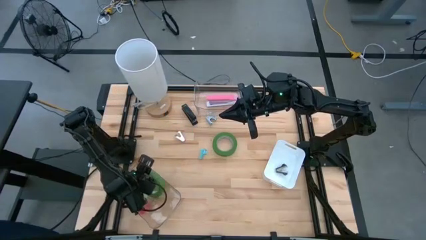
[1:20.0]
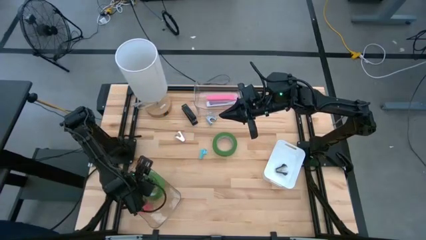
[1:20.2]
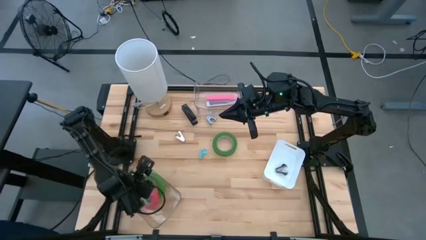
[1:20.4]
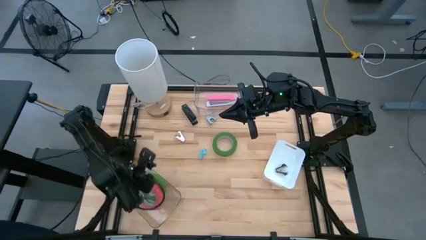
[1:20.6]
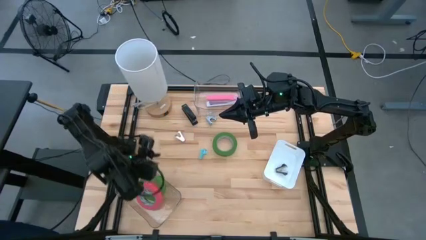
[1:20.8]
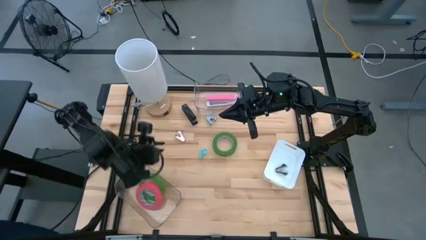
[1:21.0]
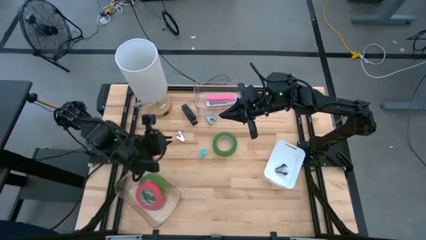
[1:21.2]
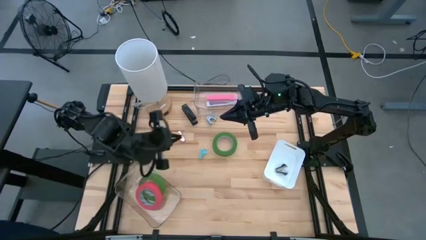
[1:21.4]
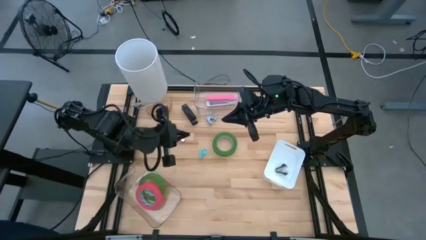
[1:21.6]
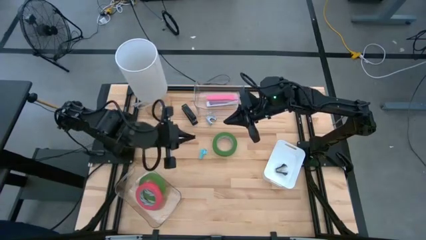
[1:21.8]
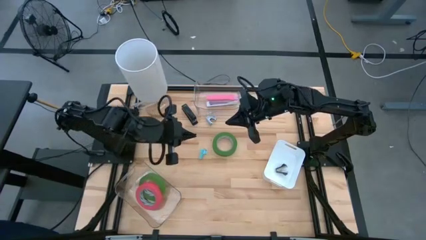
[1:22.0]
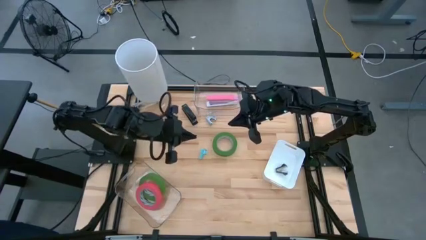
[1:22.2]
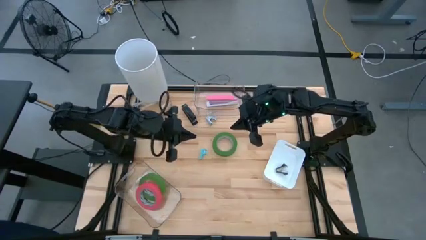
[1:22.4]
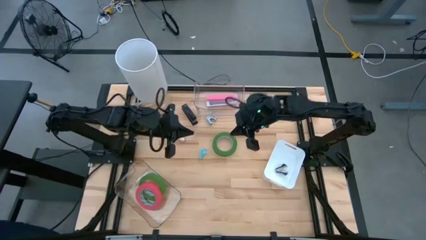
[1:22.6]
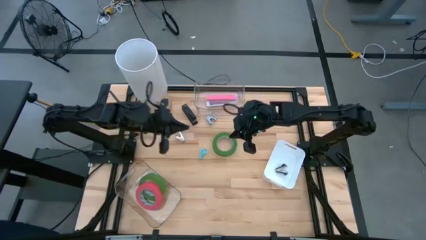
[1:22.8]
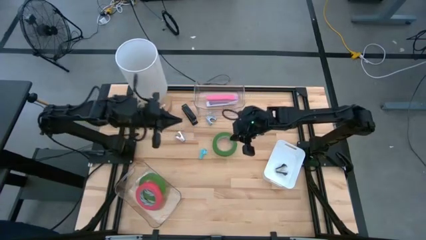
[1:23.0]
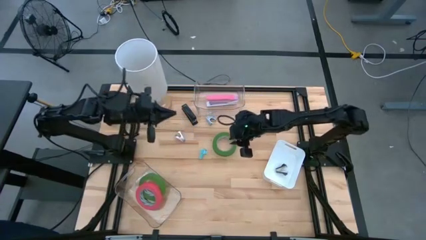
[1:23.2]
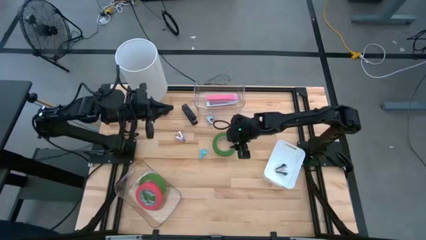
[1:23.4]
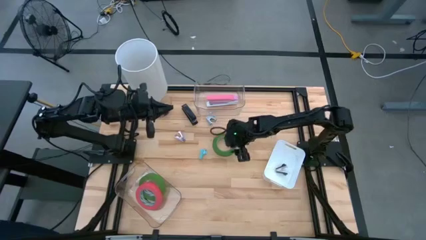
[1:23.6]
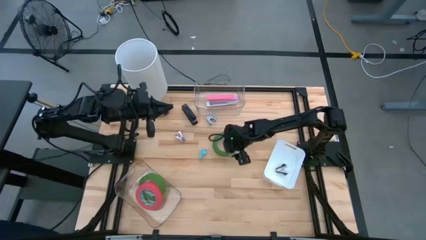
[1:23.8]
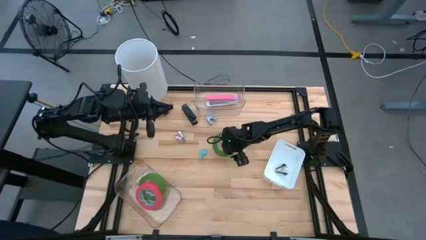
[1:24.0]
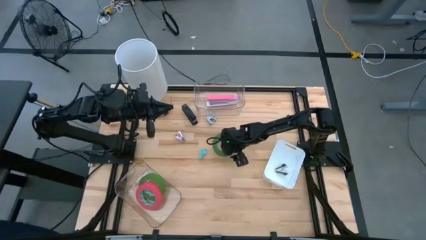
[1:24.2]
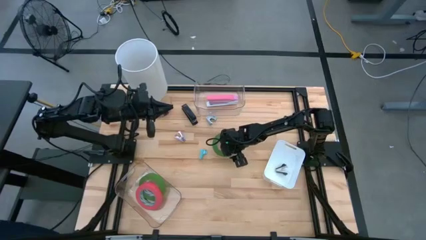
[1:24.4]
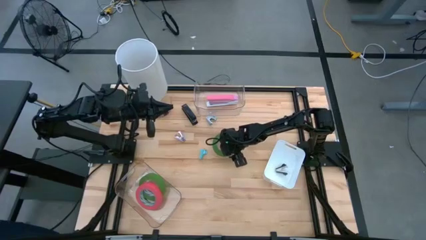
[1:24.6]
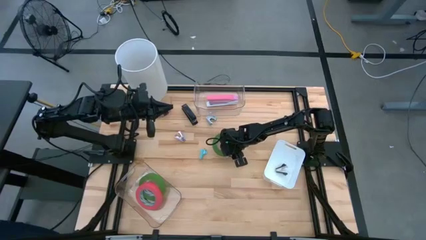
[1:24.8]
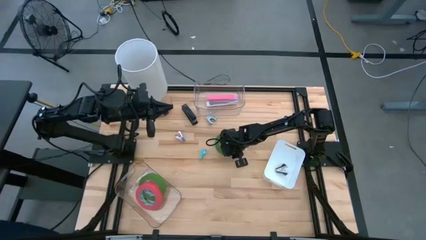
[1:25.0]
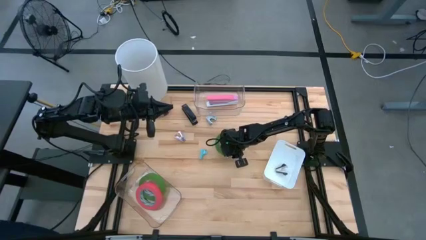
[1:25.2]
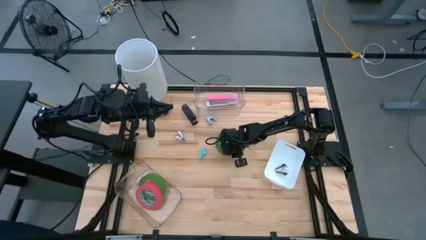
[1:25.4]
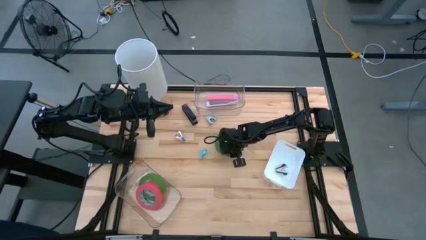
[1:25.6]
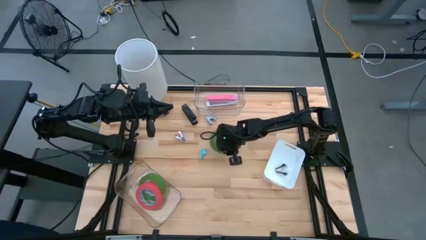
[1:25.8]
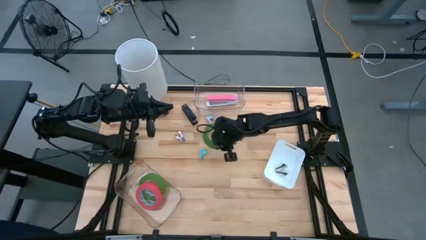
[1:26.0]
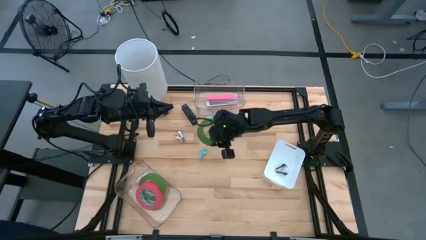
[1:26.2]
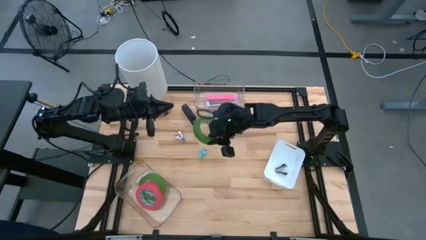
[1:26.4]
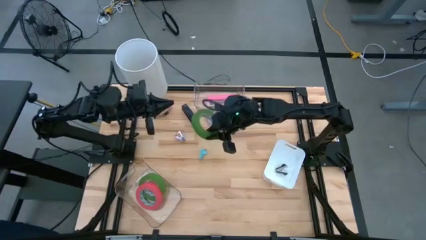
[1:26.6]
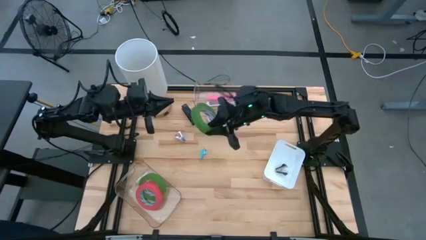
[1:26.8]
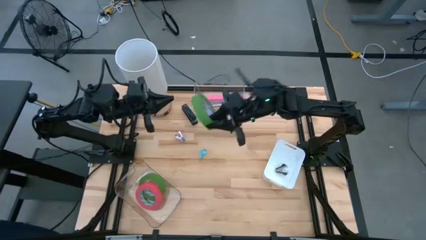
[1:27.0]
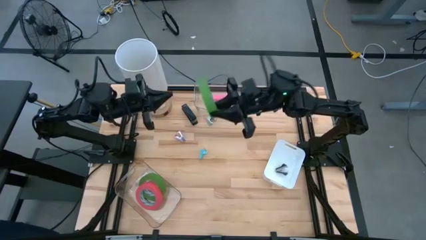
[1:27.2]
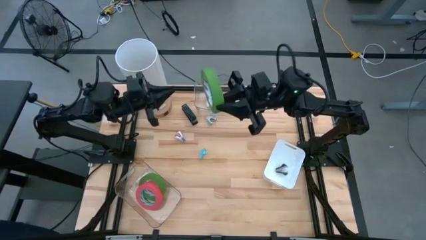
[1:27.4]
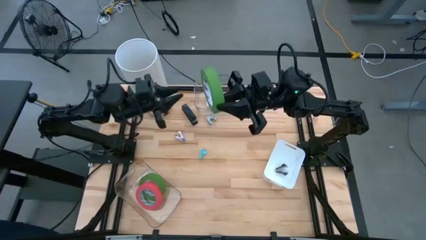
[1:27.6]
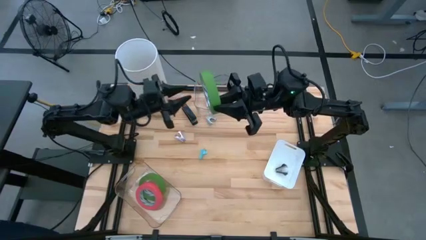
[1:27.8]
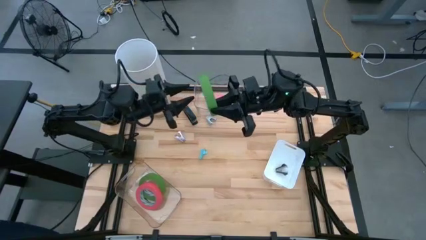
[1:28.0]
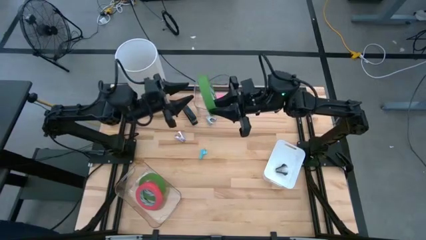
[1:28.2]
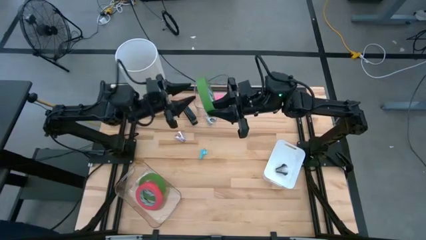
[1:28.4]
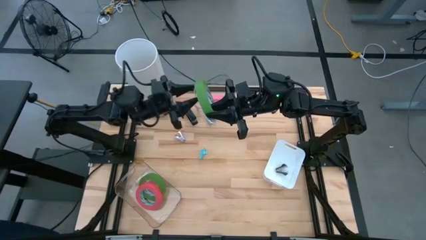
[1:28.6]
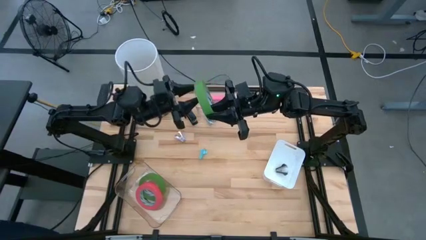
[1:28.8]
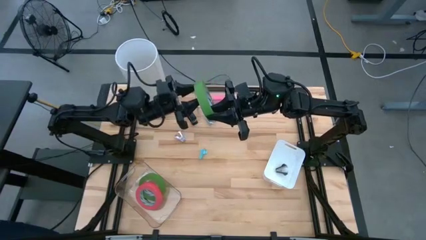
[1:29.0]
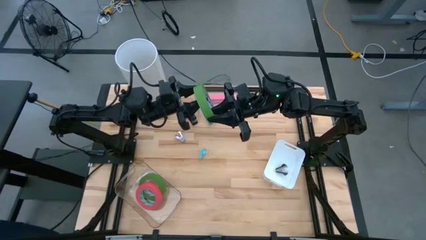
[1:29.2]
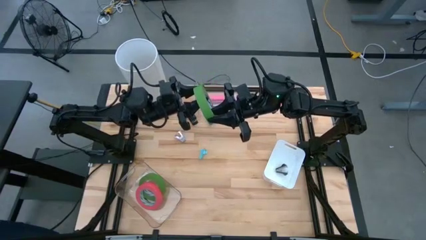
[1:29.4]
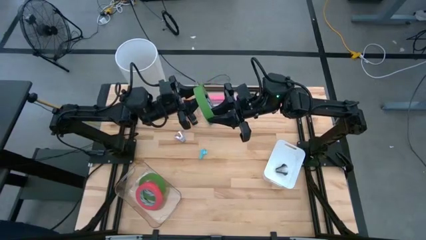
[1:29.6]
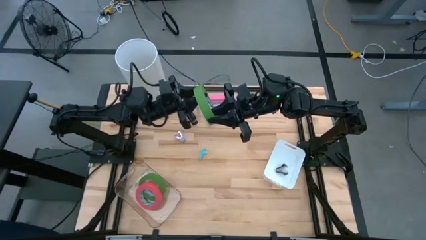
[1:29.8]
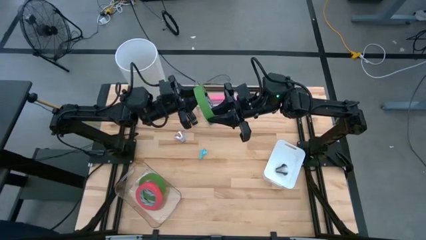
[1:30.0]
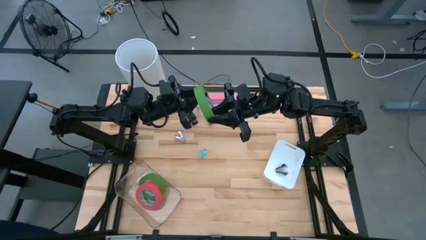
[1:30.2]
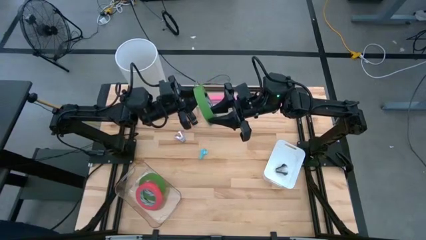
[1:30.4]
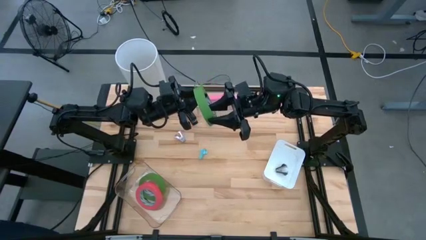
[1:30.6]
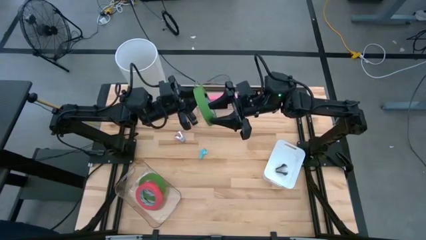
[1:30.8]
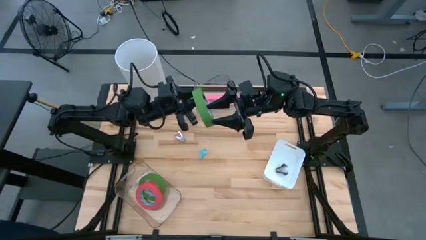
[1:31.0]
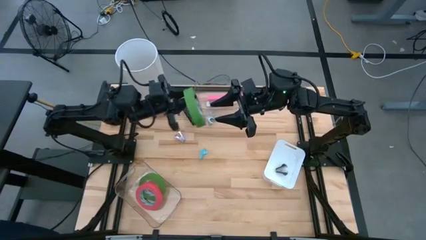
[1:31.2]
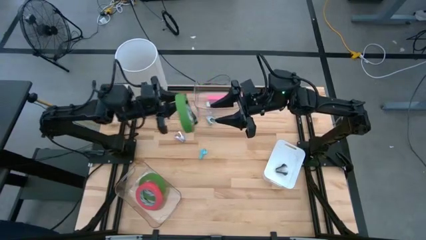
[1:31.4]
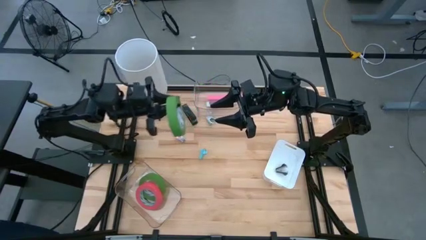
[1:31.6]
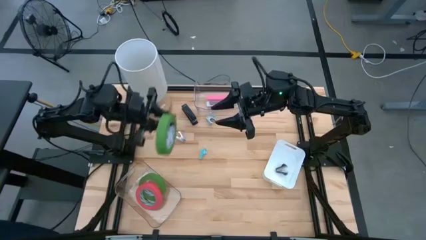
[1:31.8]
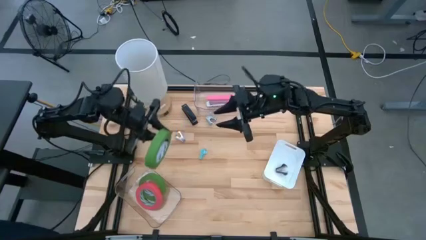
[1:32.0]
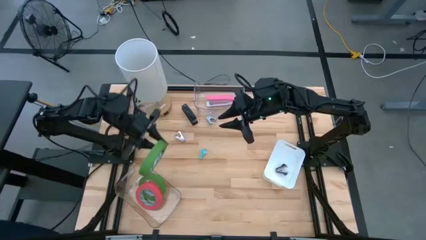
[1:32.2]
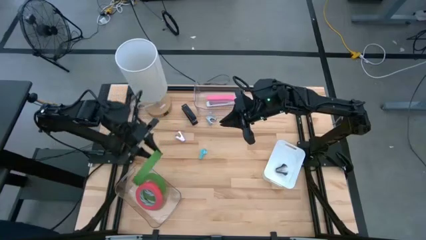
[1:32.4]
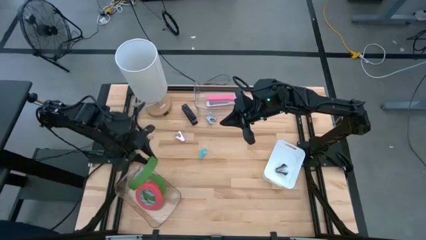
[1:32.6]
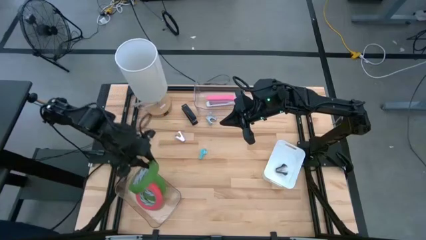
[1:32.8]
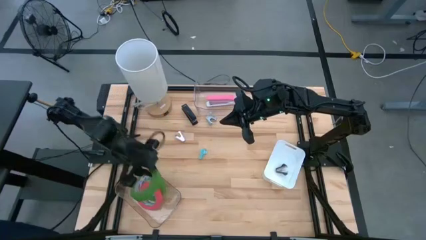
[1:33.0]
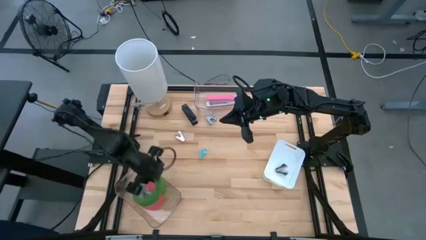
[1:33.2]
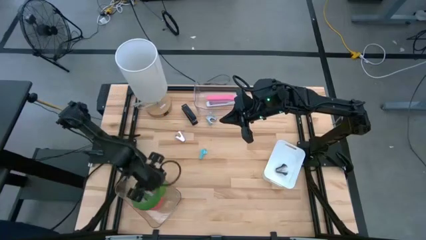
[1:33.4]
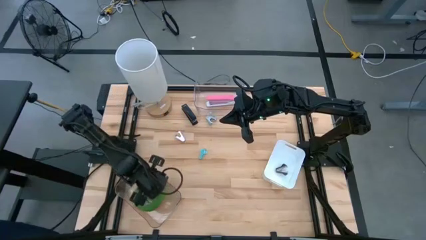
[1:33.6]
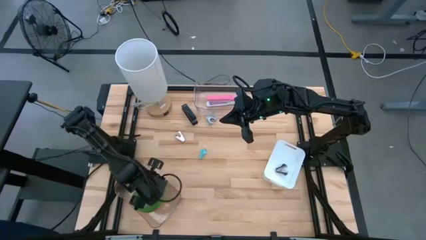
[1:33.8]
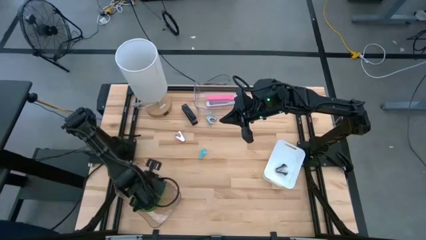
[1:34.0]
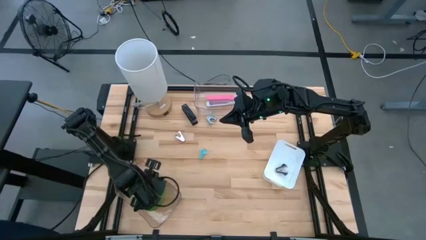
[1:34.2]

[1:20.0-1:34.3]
Task: Pick and place Stapler, Stapler remover, tape
Put the green tape into the bottom transparent bin

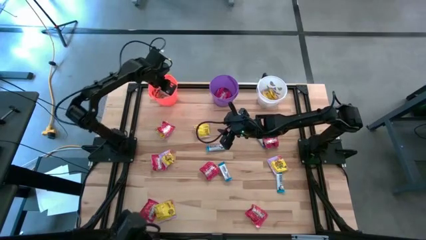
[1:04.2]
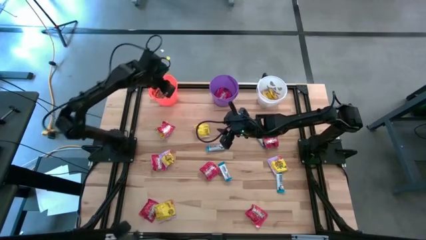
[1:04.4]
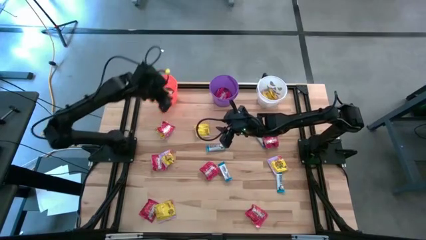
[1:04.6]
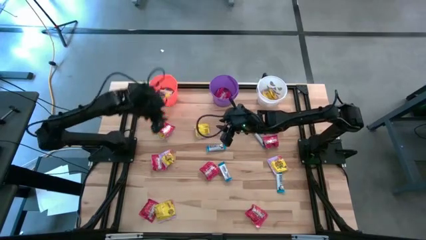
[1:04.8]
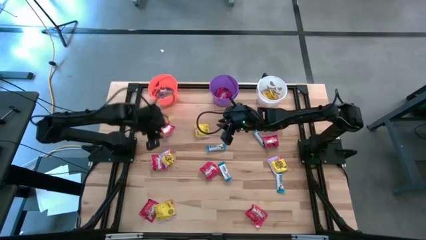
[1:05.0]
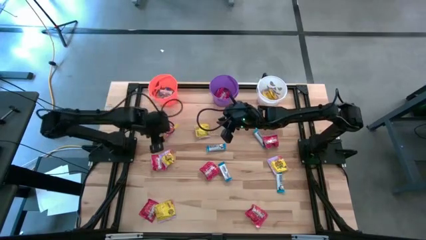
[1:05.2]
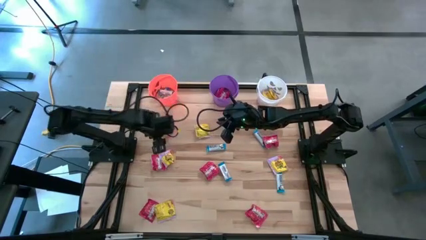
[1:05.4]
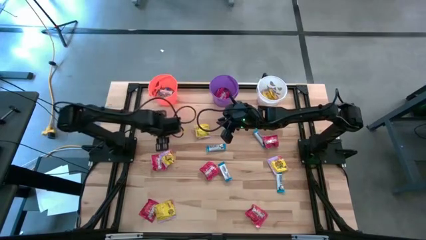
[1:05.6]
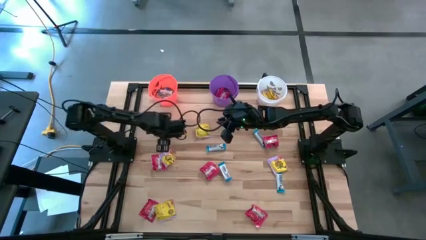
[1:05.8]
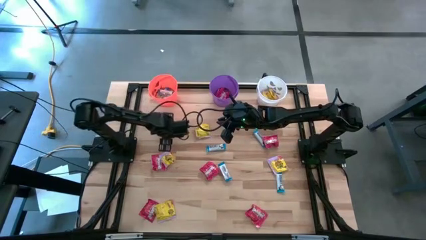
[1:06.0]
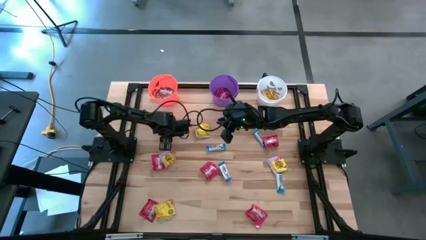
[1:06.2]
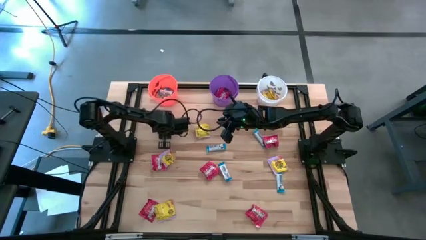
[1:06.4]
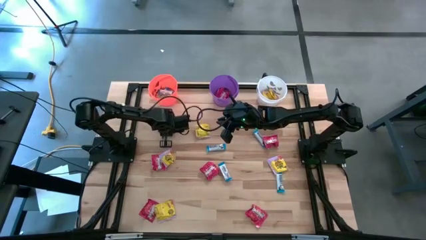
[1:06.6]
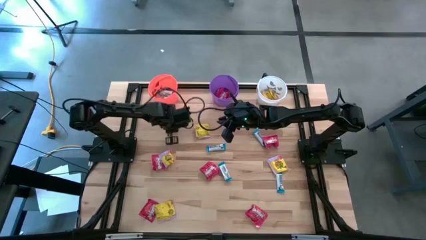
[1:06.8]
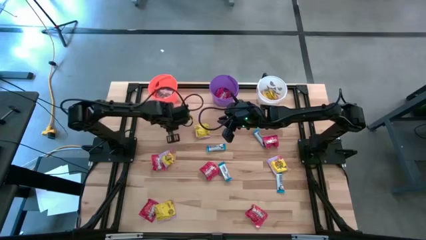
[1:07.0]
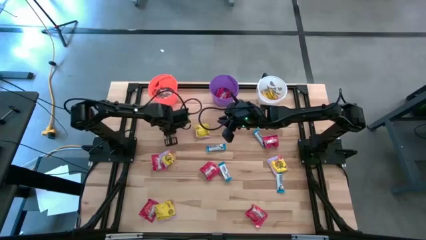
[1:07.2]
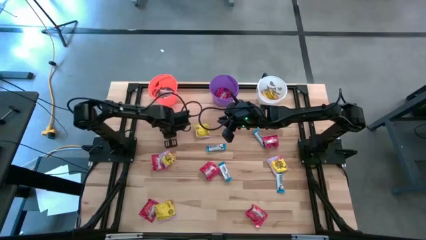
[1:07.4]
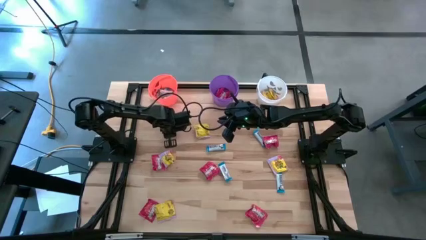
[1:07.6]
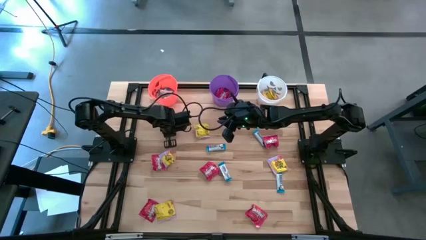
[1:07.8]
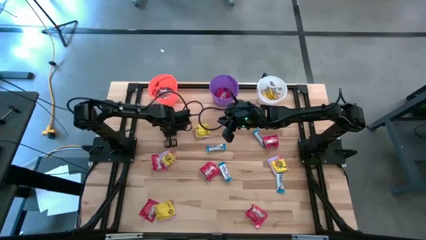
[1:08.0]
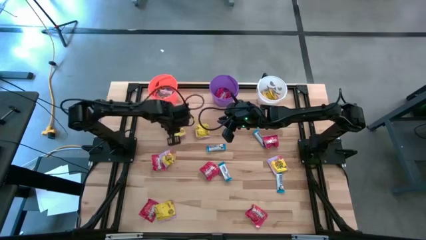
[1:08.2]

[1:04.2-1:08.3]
Task: Sort candy
Put the red candy into the purple bucket
